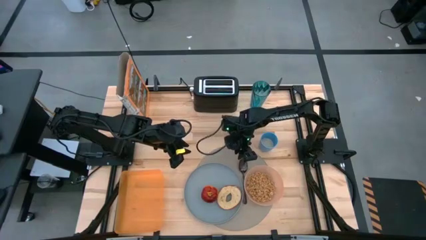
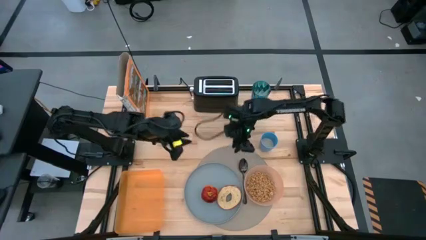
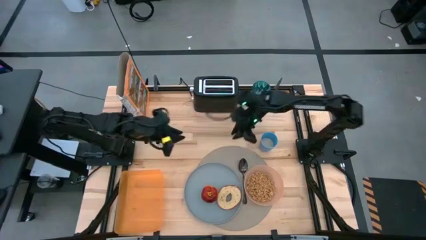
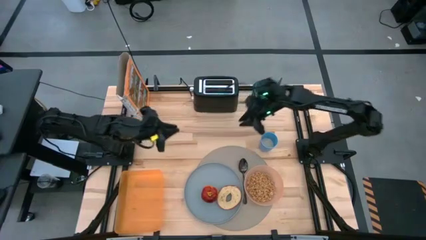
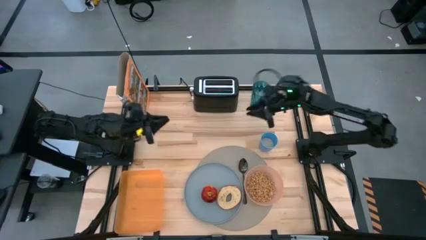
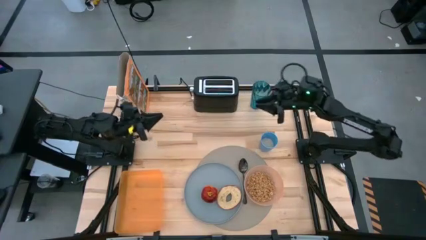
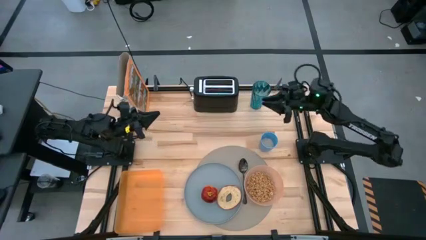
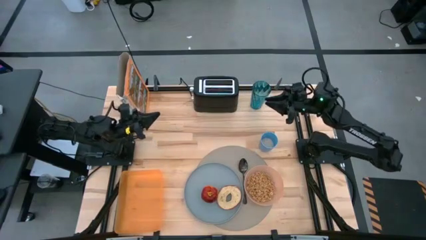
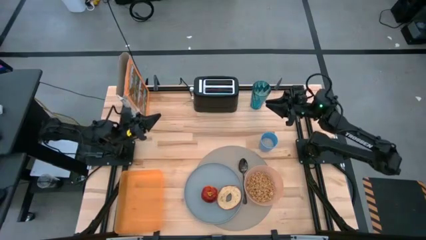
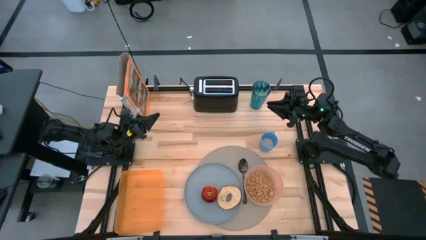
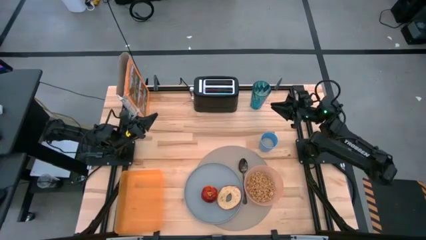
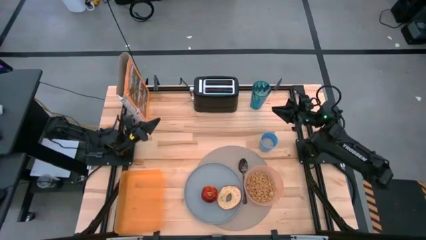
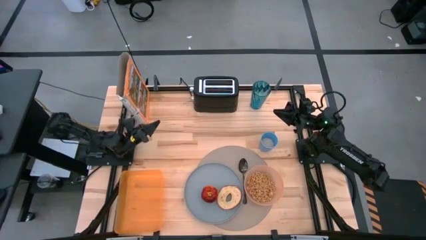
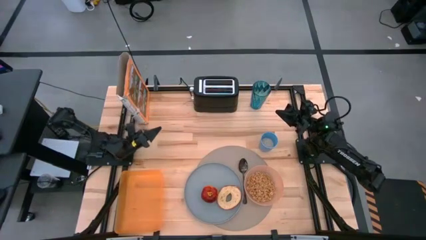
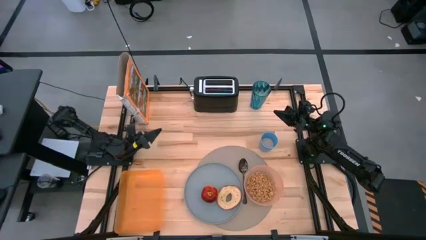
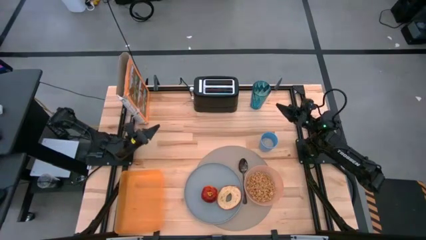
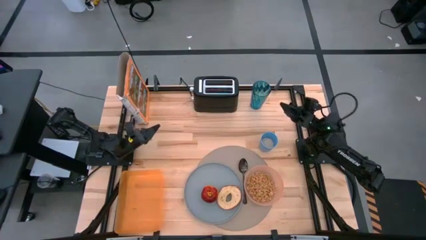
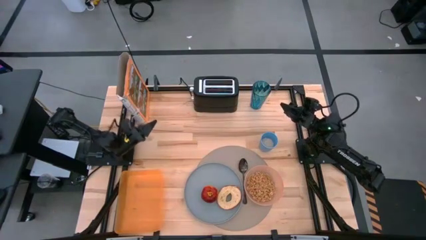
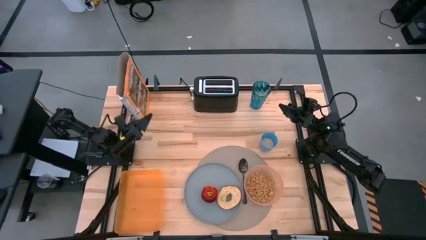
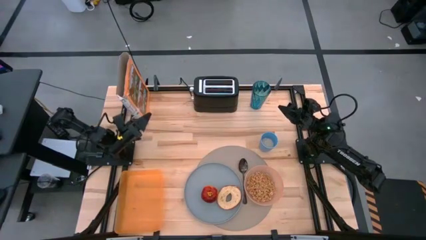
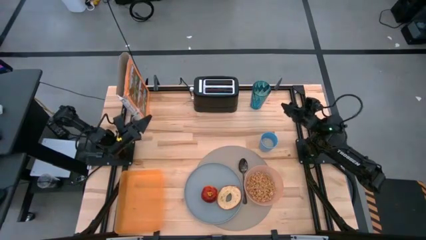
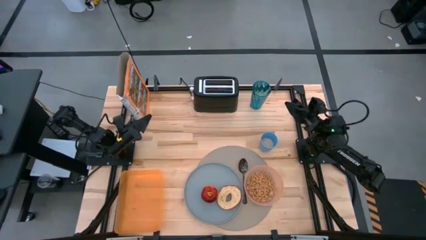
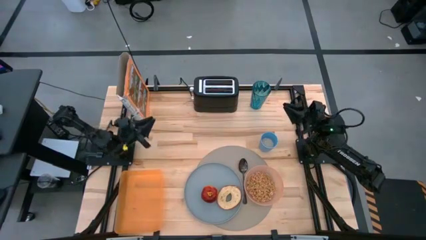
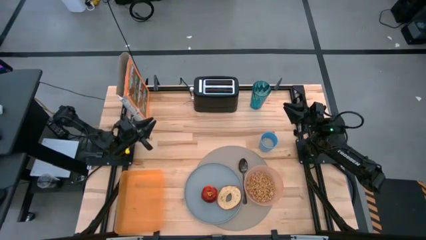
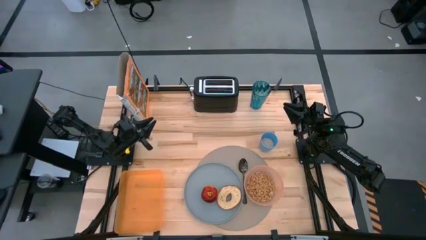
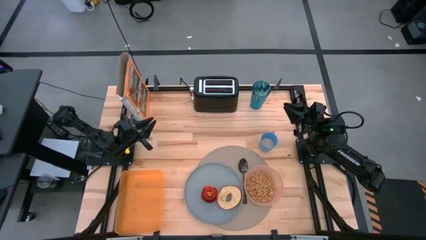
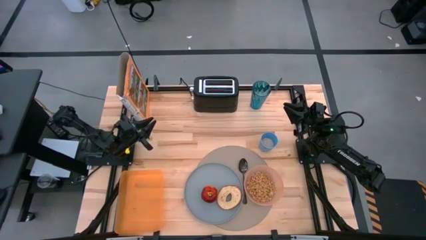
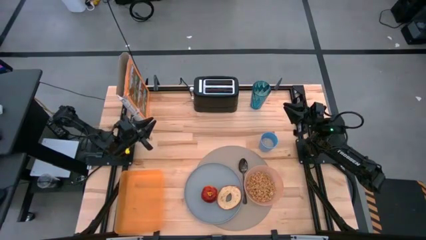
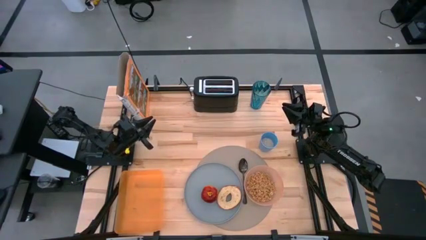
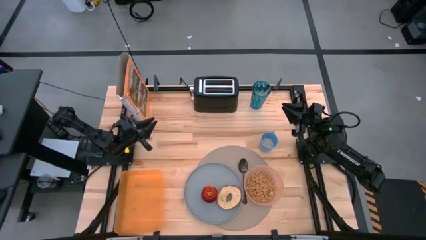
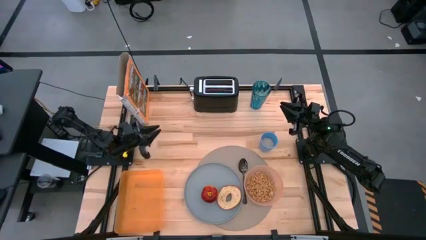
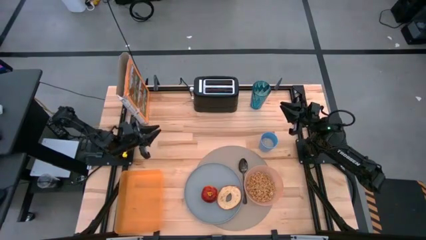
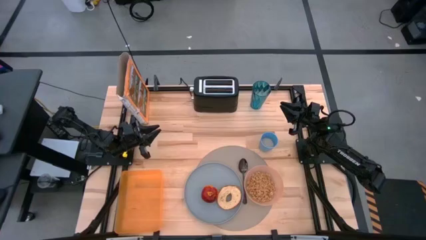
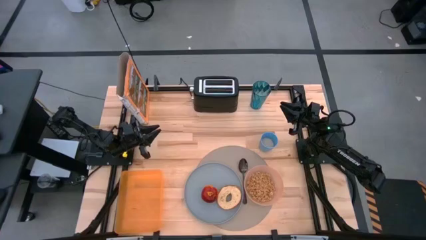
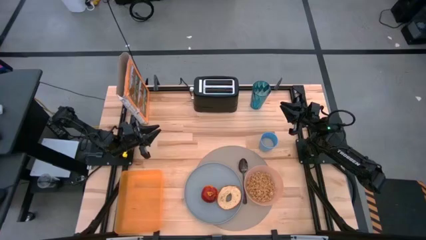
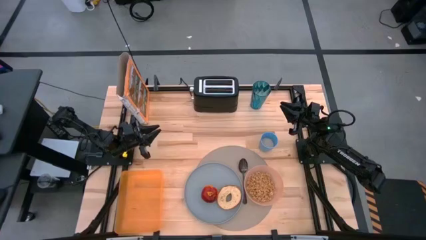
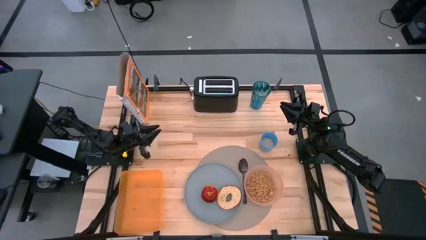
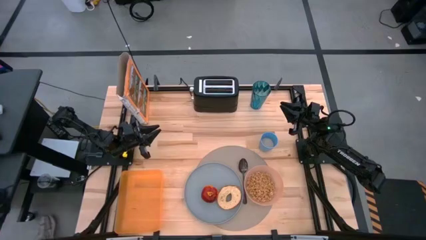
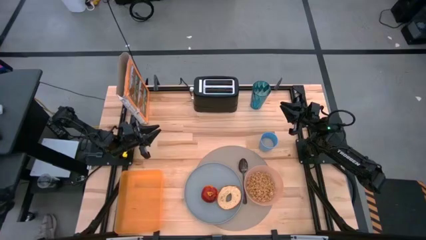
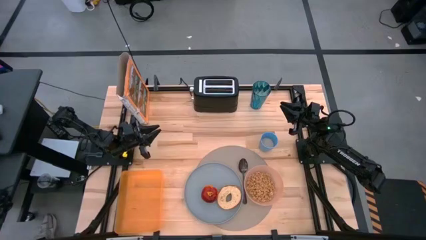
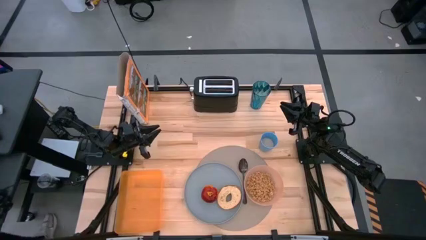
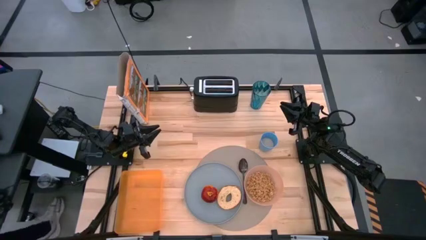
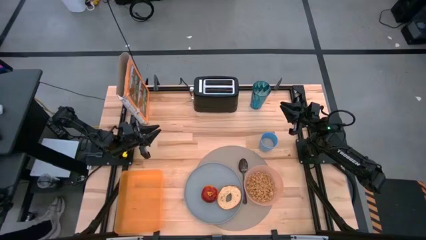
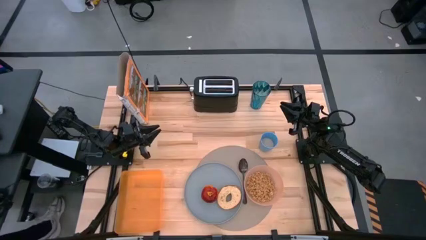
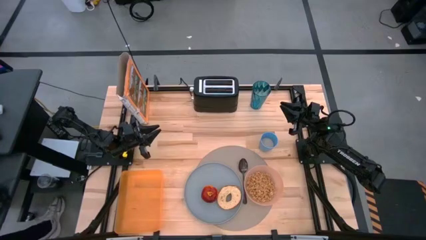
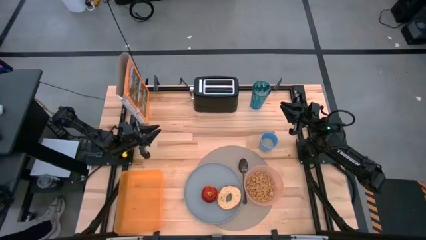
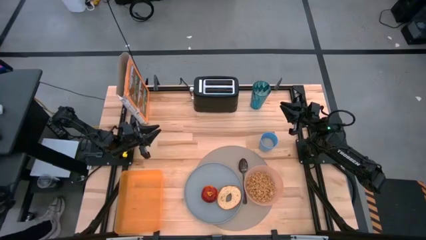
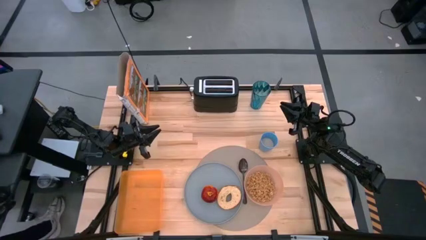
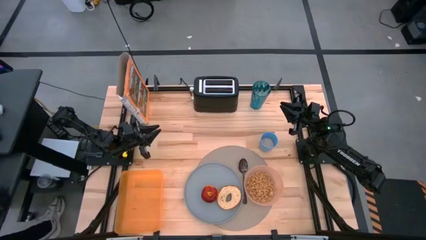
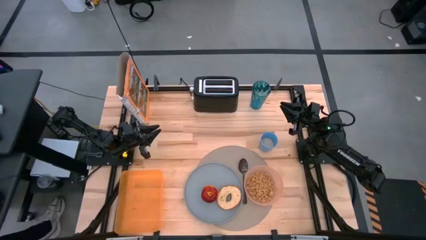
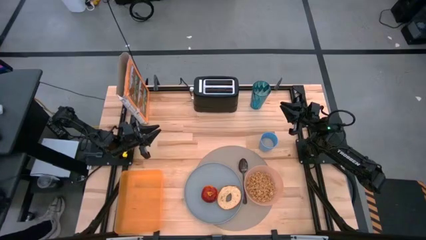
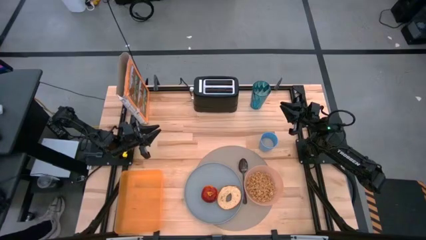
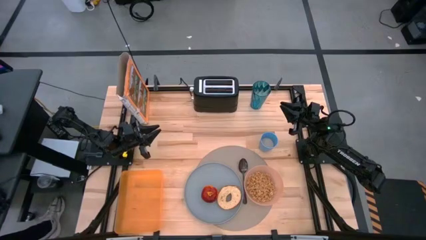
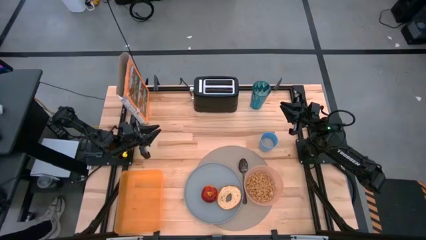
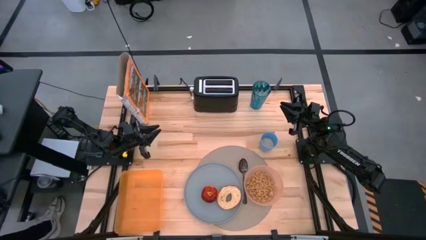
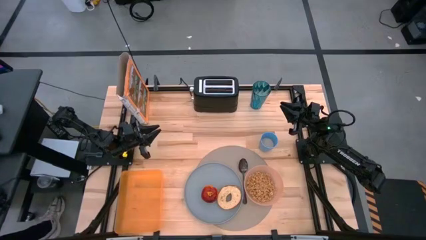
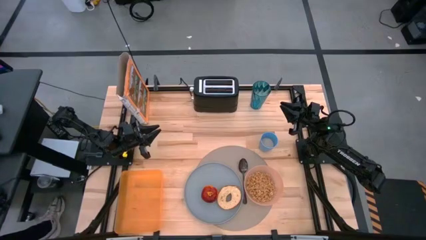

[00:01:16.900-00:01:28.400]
Task: Arrange a breakfast setting
Return to Home Position
